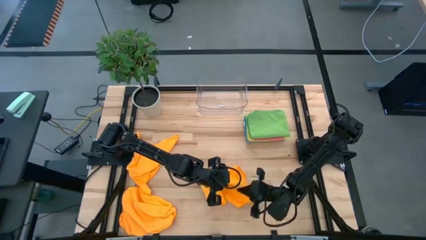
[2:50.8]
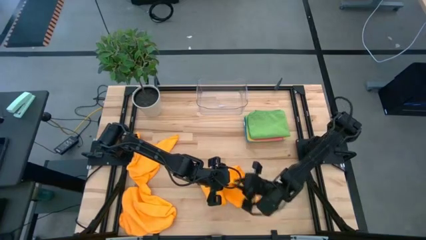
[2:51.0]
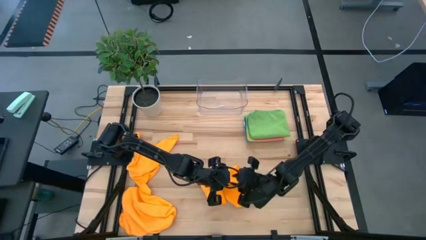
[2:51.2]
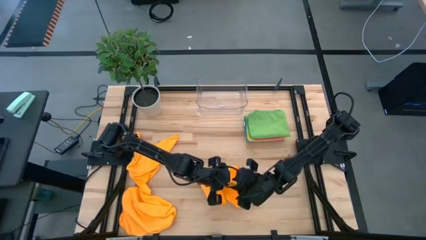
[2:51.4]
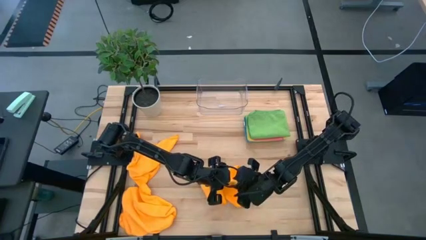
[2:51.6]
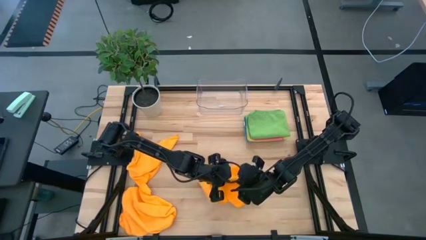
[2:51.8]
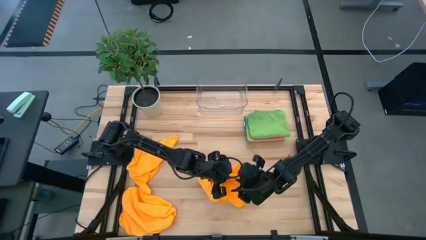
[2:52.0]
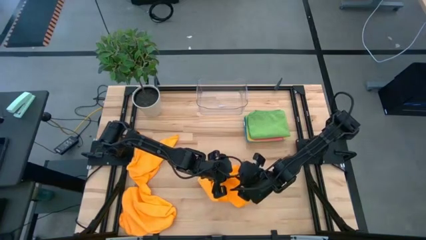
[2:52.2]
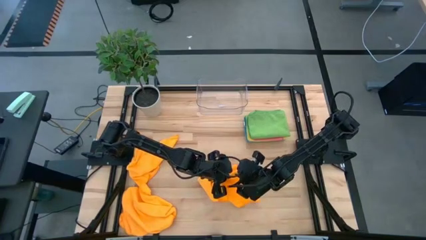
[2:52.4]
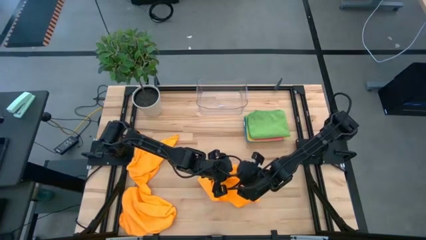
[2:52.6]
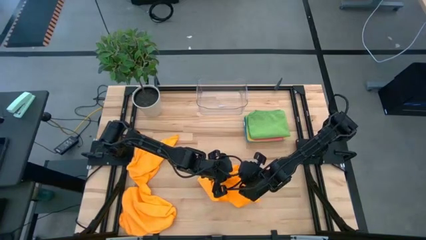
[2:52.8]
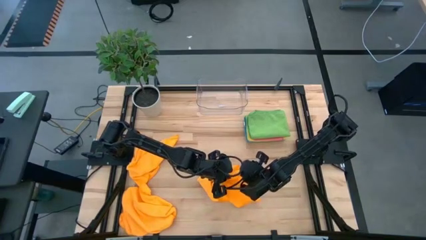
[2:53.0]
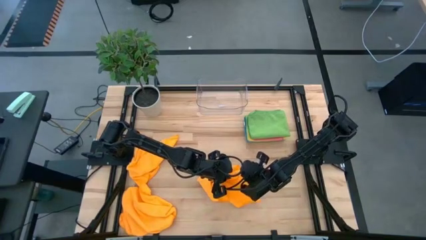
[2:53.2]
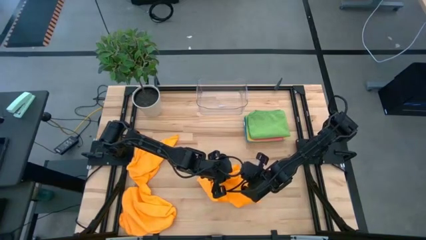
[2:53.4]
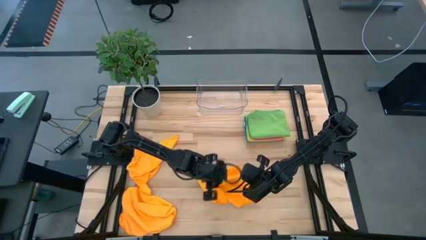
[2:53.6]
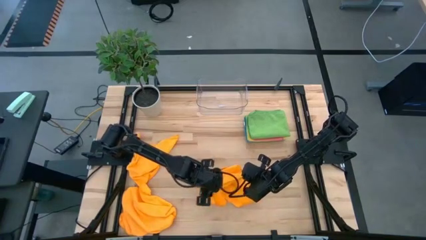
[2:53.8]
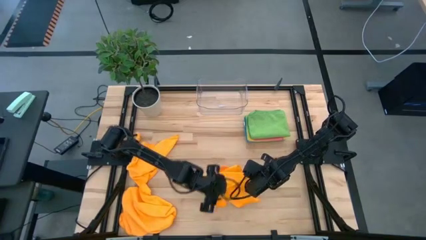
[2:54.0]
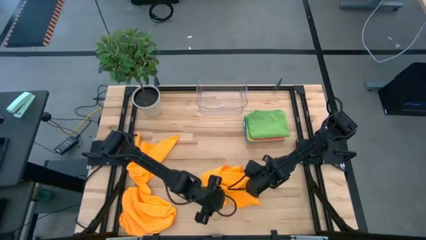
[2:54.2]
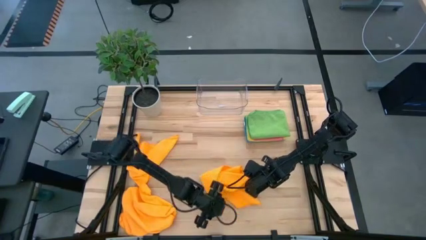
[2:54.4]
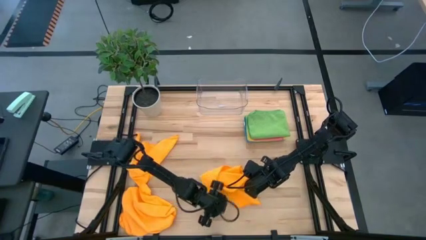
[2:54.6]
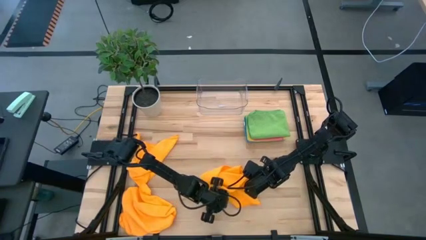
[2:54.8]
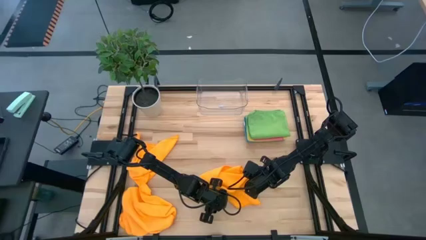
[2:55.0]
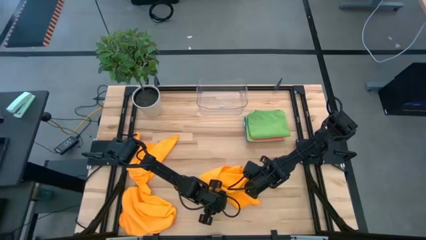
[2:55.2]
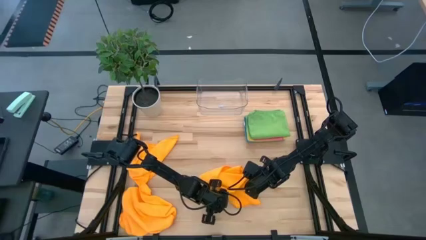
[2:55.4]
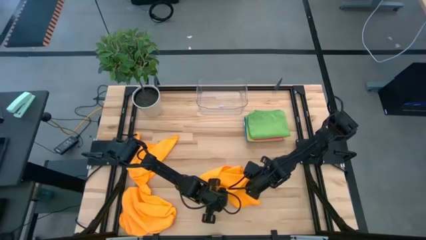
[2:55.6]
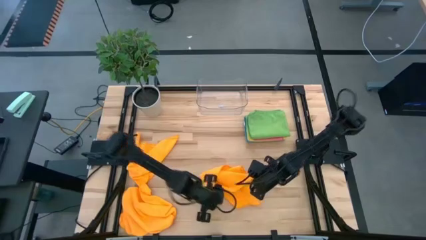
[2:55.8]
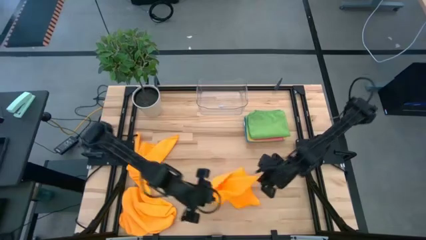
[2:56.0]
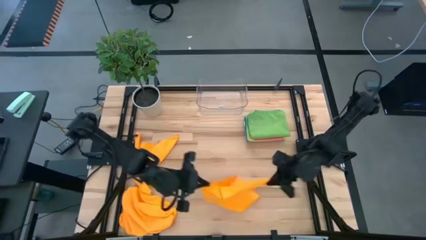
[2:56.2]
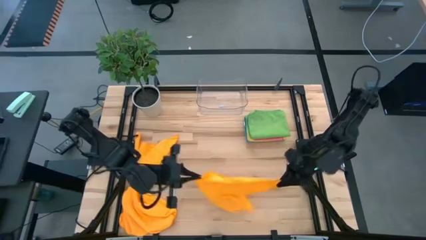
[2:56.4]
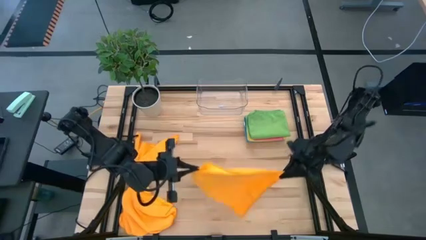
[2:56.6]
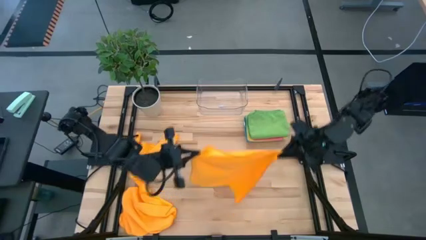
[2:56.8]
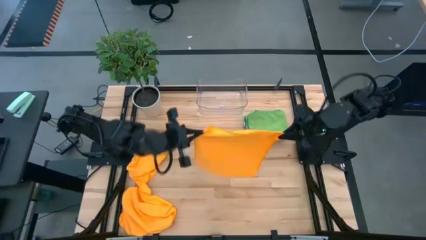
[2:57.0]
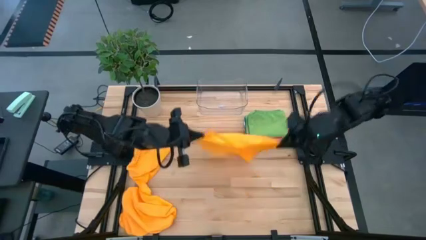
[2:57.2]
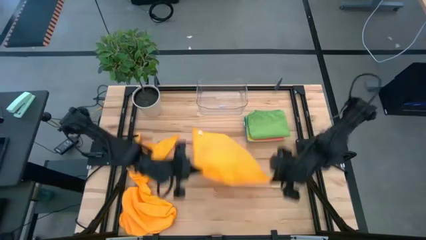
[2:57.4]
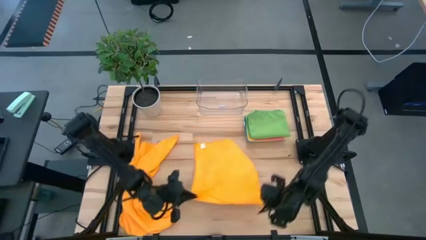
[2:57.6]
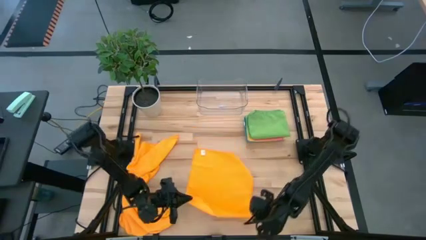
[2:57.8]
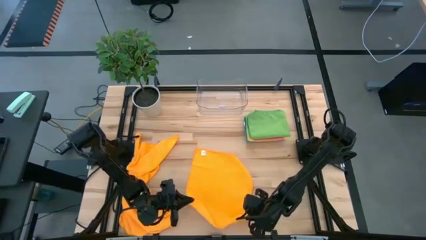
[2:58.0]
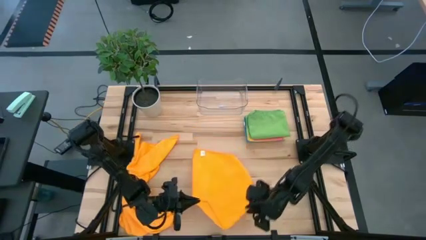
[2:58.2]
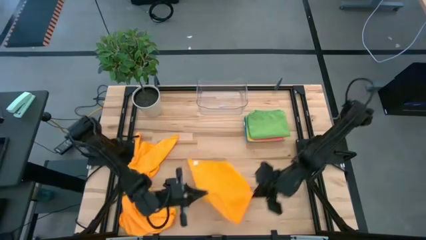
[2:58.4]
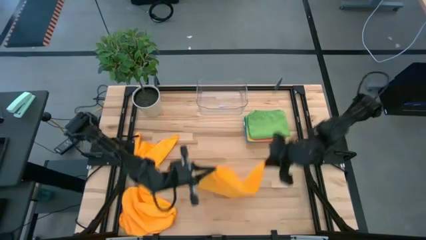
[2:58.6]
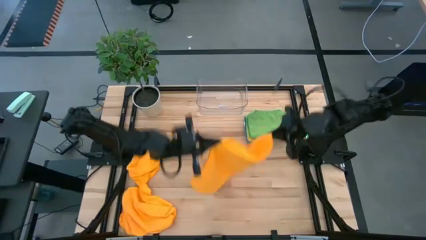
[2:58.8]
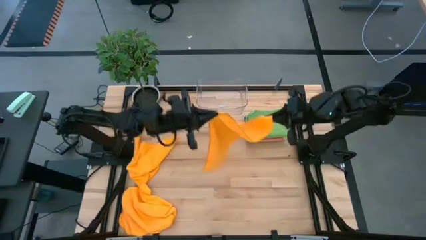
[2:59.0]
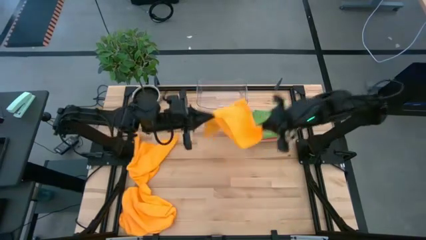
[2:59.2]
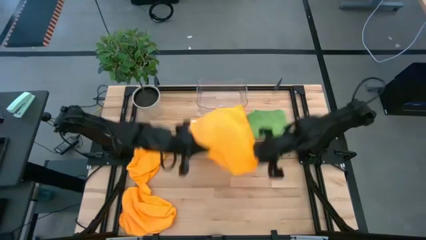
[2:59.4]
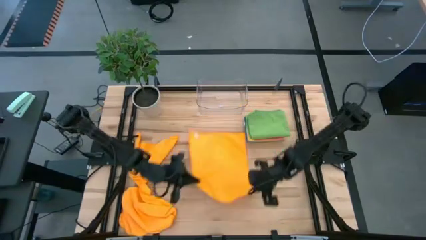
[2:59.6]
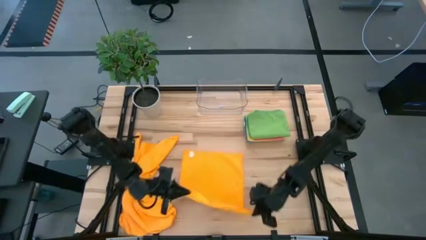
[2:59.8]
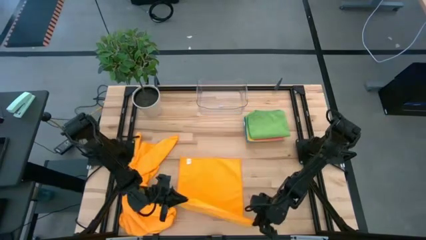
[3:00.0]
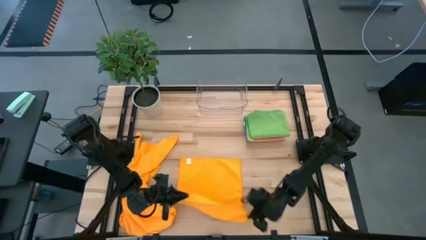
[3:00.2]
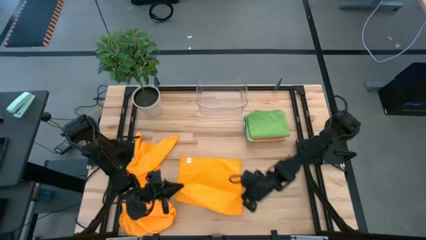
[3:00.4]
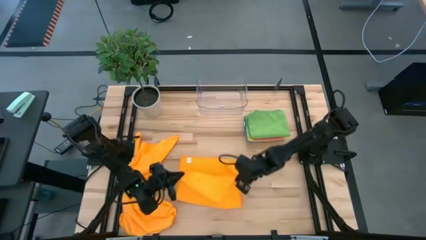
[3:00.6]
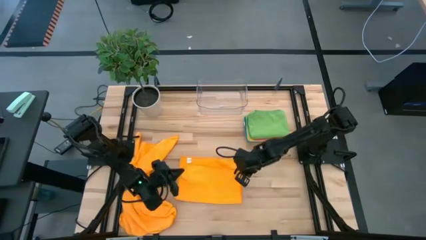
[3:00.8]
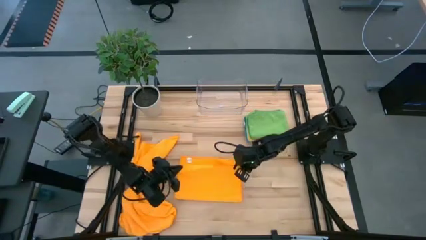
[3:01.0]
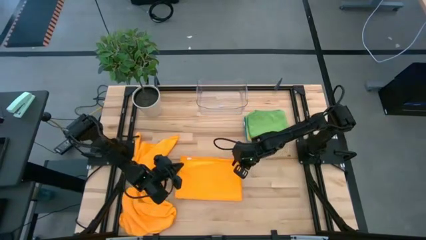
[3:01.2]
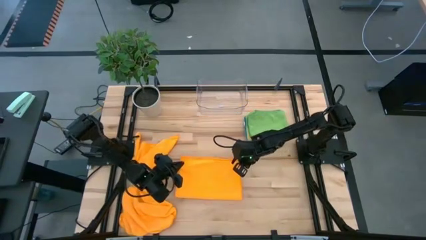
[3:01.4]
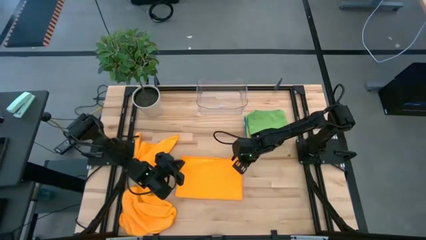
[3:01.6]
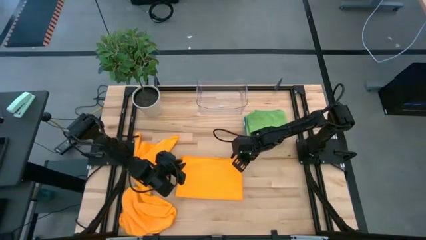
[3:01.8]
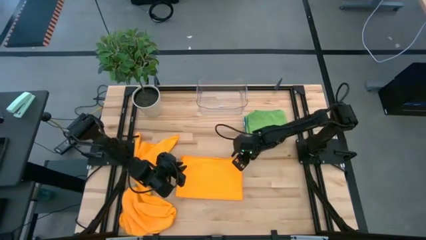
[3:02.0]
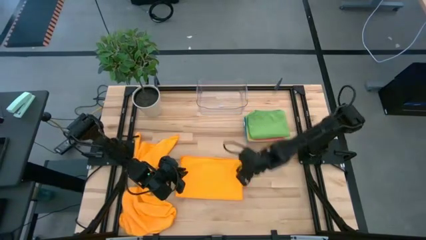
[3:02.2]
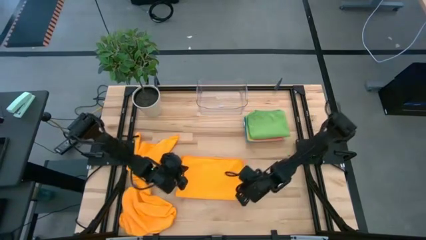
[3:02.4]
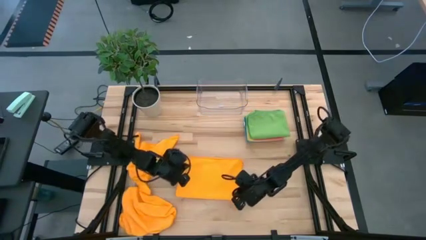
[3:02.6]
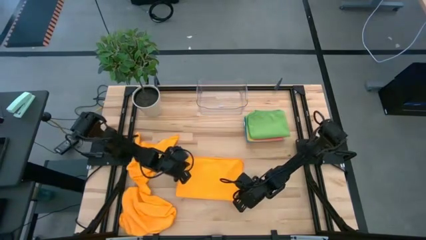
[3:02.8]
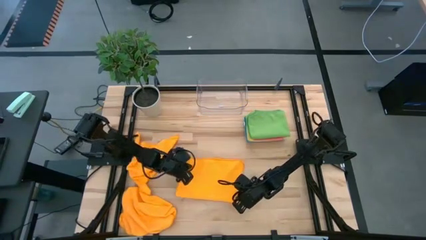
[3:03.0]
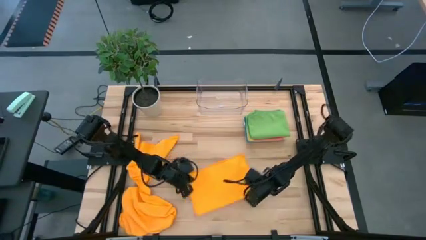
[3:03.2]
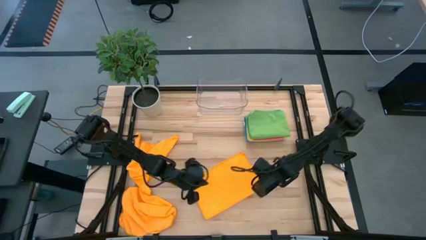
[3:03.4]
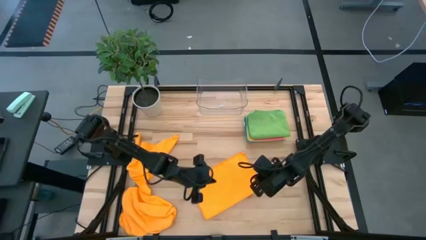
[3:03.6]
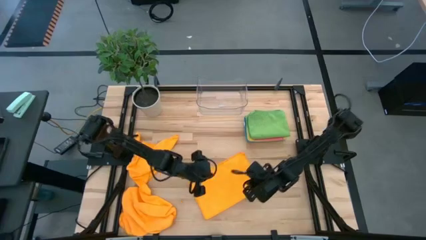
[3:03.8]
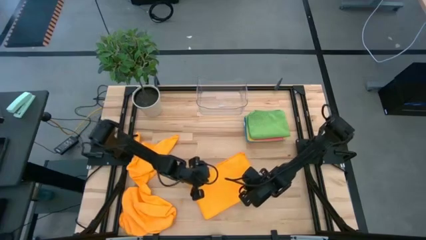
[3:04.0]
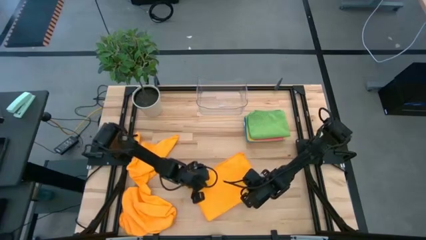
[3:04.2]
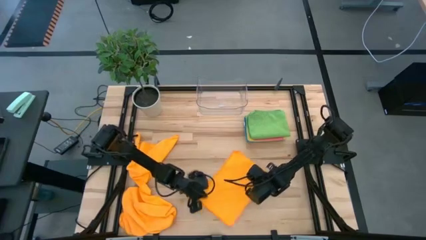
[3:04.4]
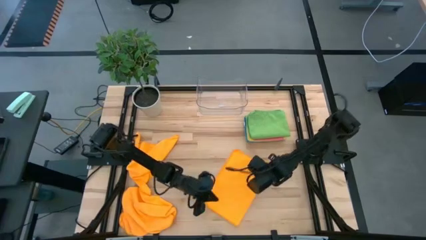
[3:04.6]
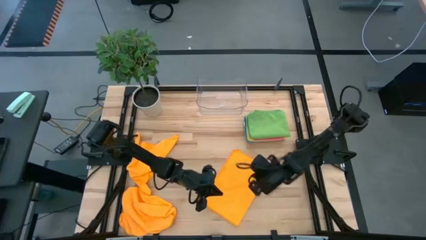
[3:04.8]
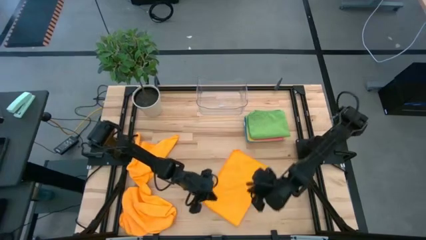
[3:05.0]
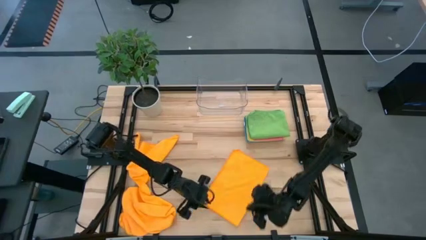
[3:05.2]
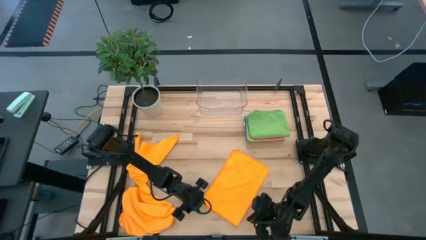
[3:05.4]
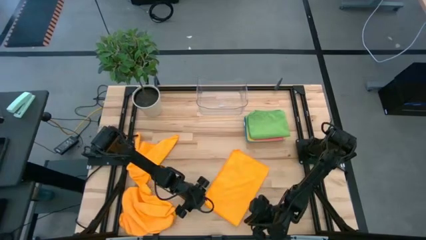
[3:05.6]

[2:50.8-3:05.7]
Task: Fold microfiber towels
Fold the top right orange towel

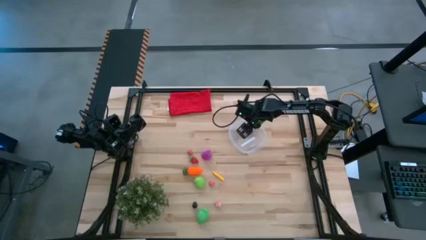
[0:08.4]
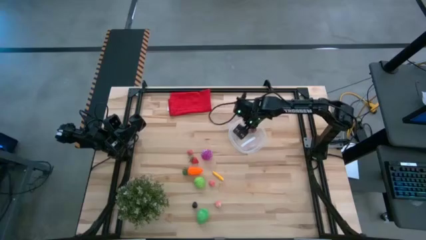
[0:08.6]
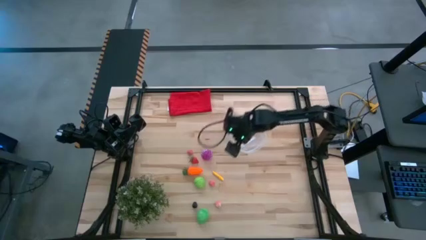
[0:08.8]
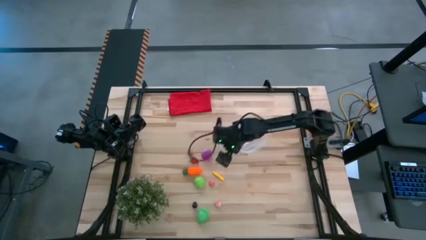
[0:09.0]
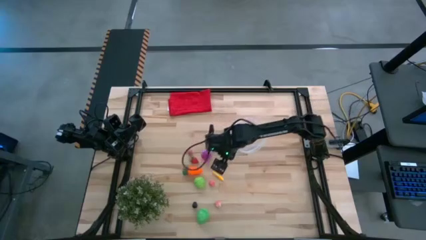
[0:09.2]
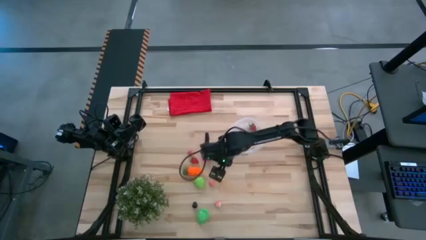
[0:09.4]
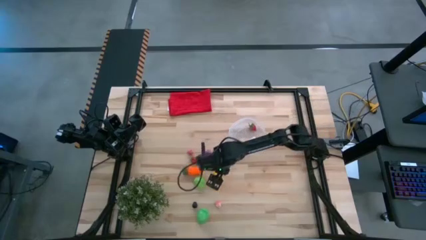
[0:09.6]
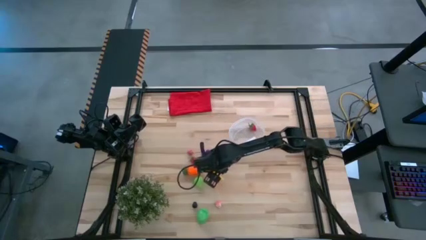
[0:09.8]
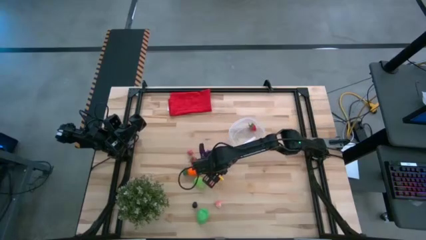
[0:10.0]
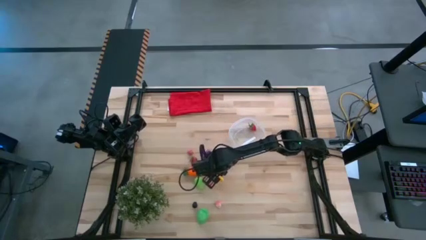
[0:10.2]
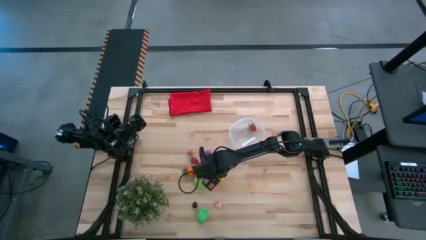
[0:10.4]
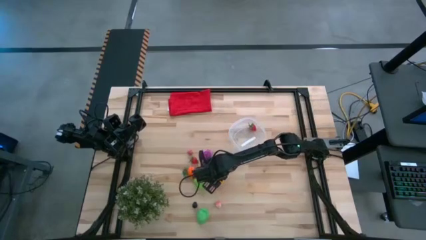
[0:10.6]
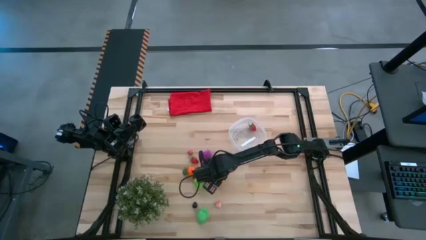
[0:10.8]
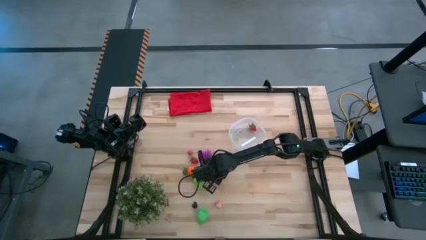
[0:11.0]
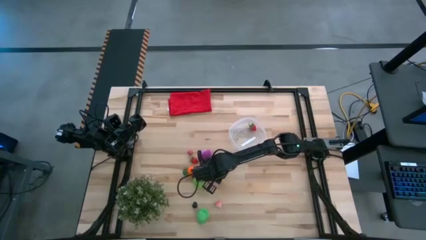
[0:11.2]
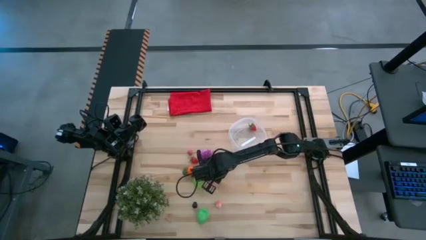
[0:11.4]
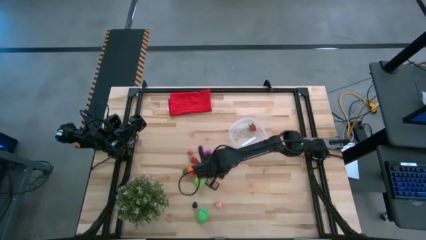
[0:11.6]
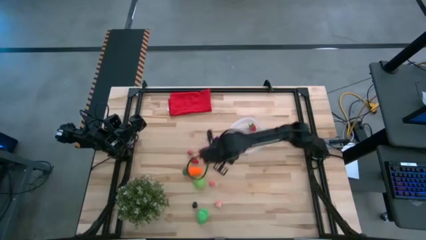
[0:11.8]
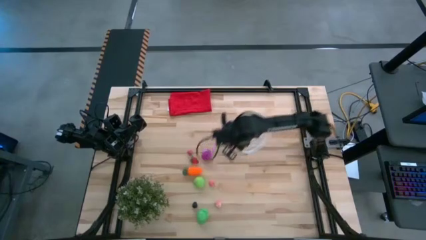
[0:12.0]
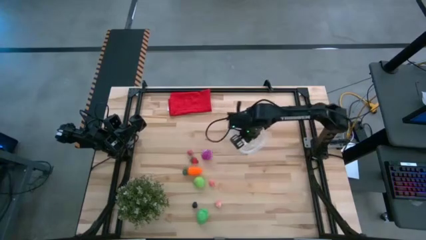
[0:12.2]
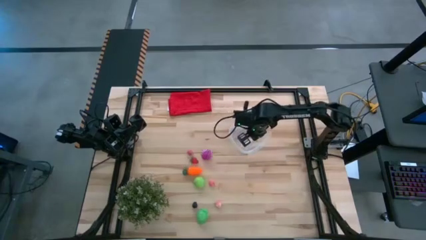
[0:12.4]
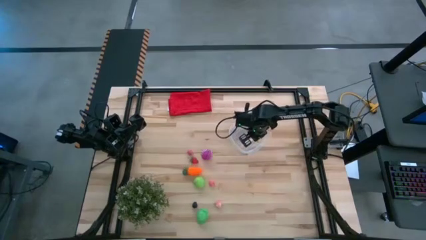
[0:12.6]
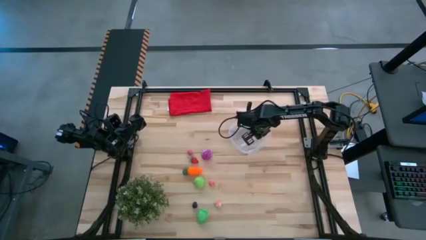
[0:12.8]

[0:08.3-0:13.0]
Task: Pick and placing Produce into tupperware
Put the yellow corn into the transparent container
